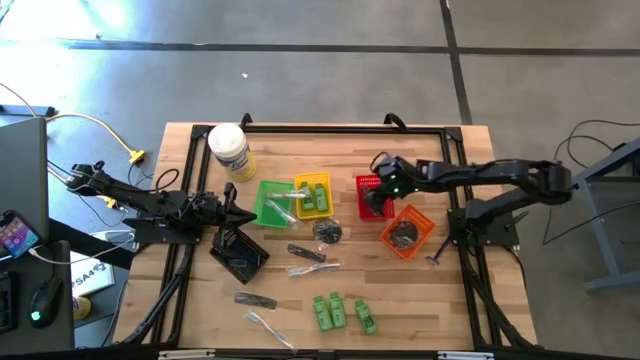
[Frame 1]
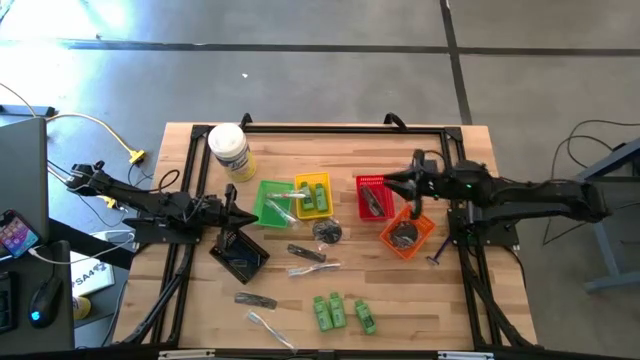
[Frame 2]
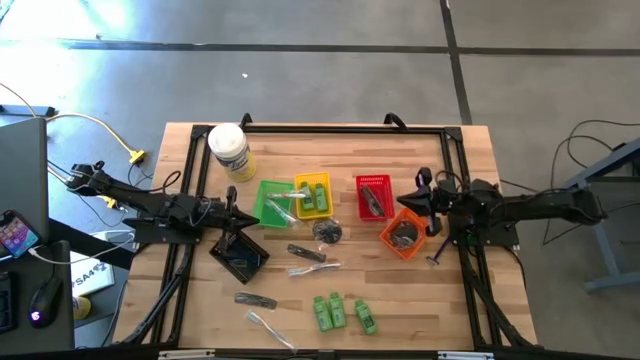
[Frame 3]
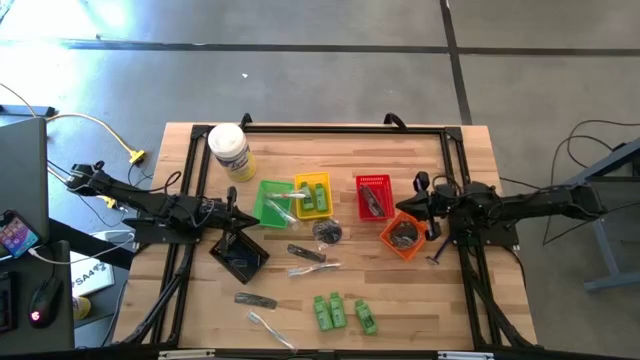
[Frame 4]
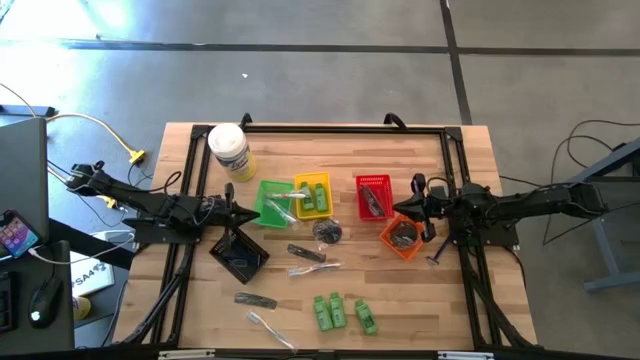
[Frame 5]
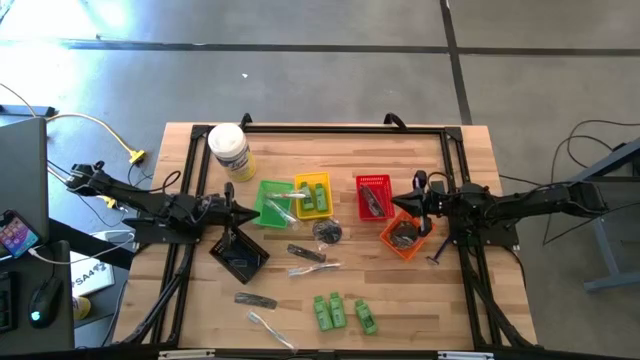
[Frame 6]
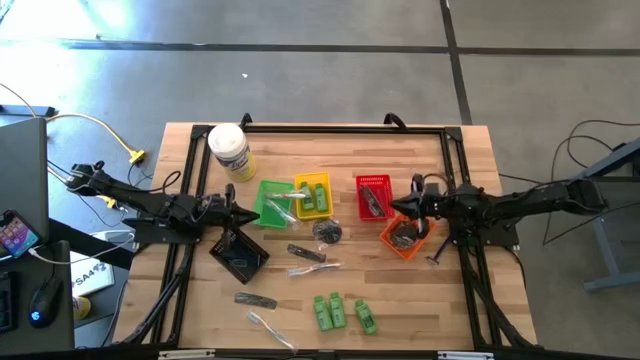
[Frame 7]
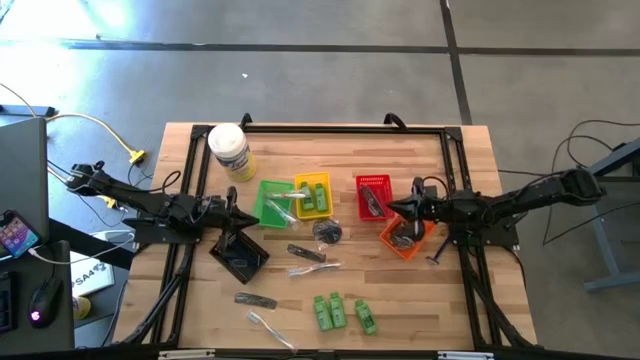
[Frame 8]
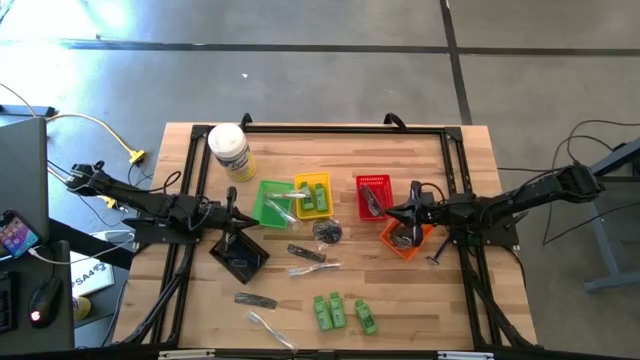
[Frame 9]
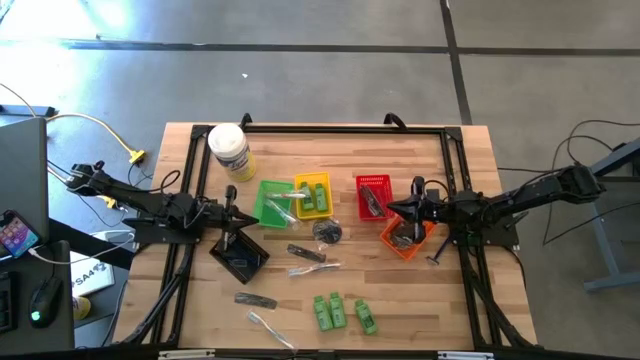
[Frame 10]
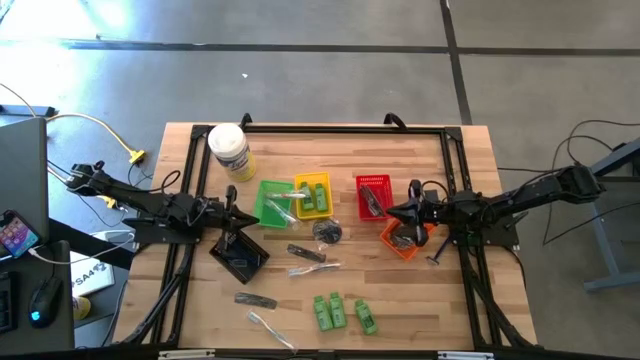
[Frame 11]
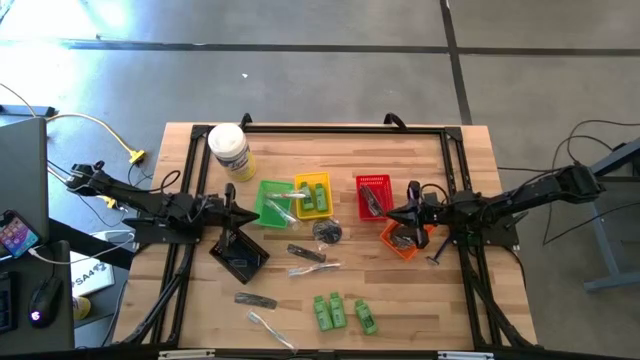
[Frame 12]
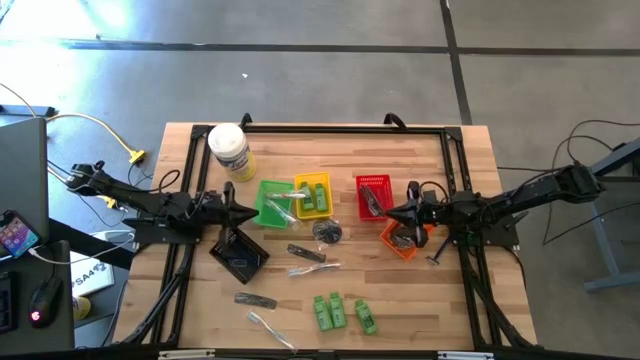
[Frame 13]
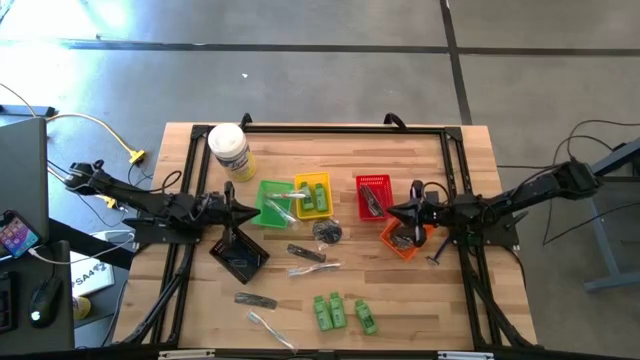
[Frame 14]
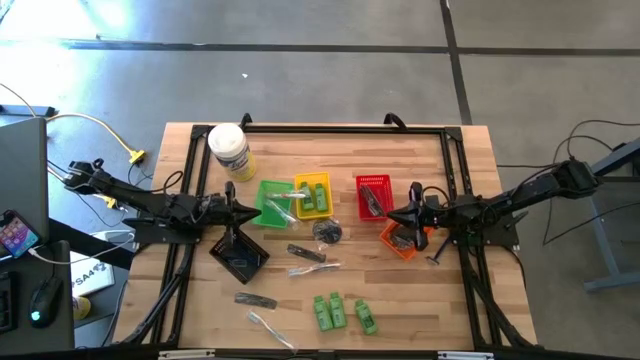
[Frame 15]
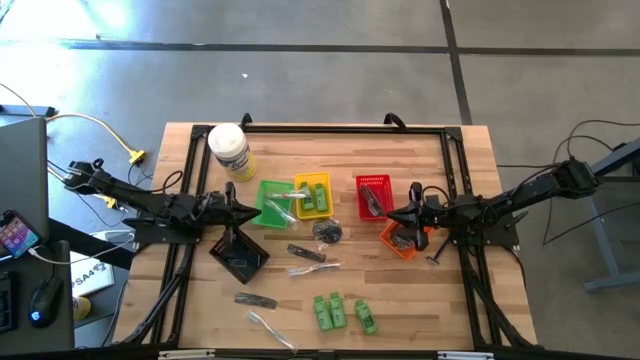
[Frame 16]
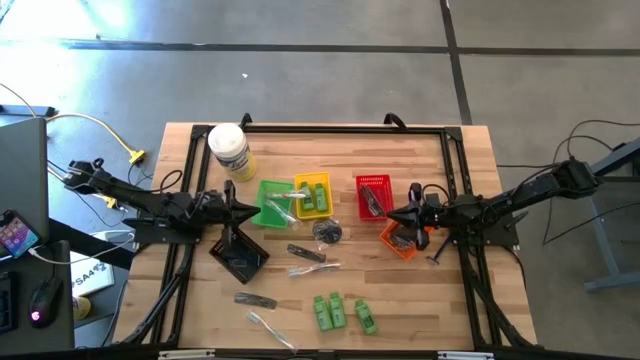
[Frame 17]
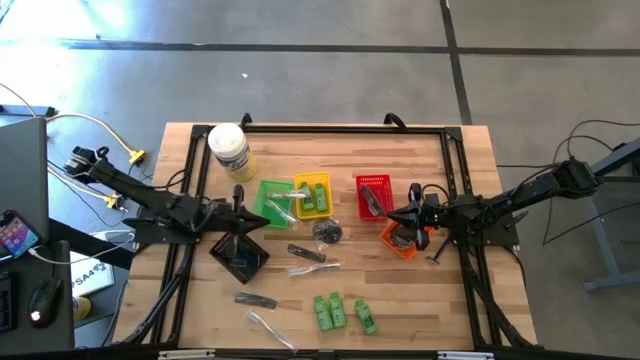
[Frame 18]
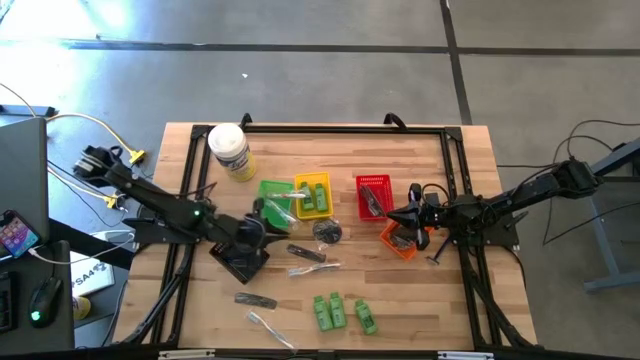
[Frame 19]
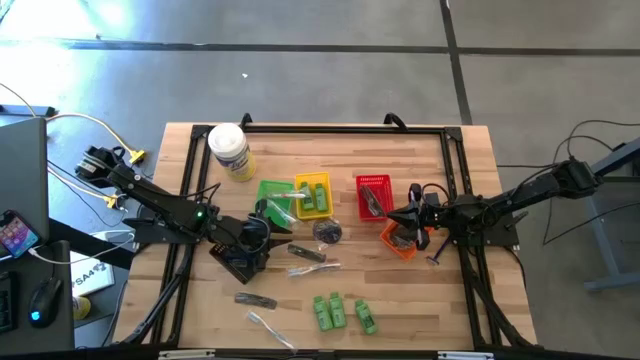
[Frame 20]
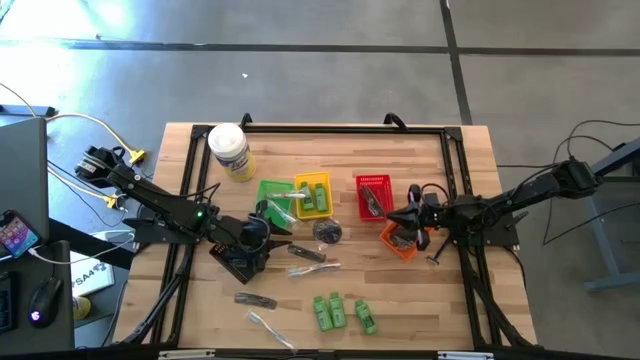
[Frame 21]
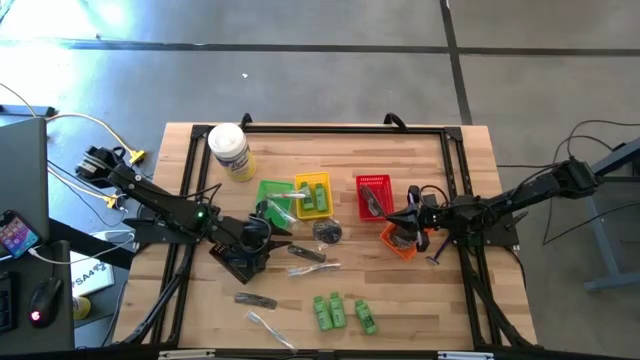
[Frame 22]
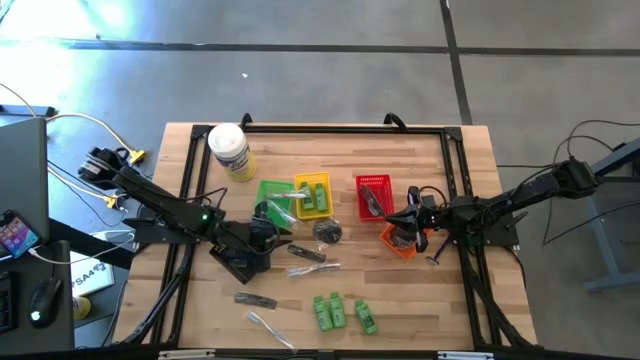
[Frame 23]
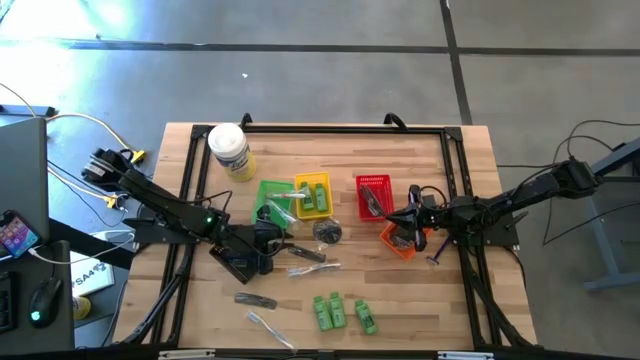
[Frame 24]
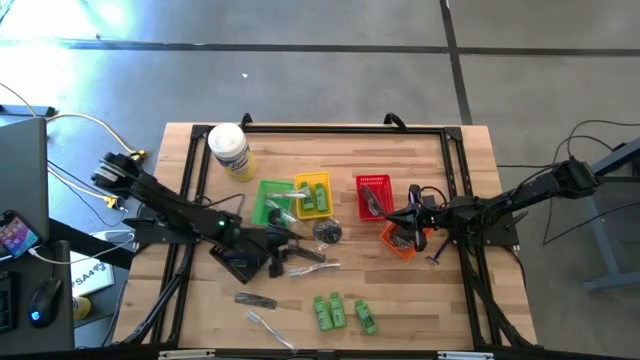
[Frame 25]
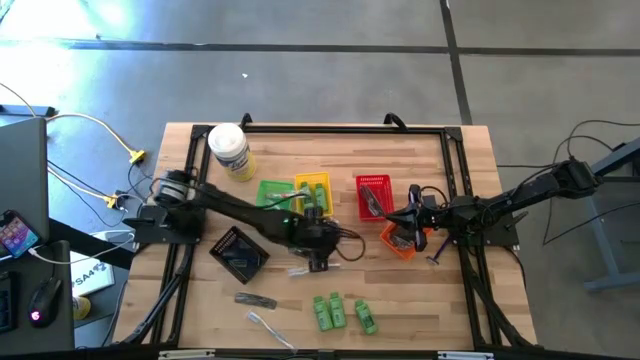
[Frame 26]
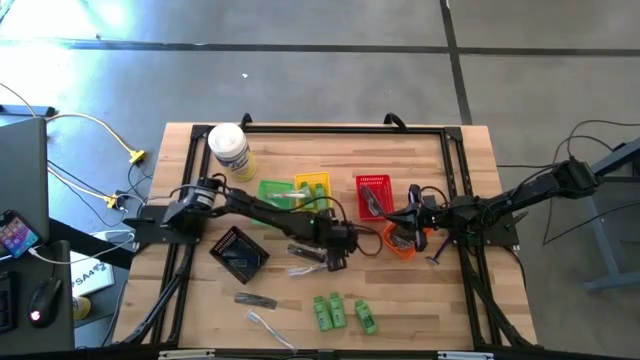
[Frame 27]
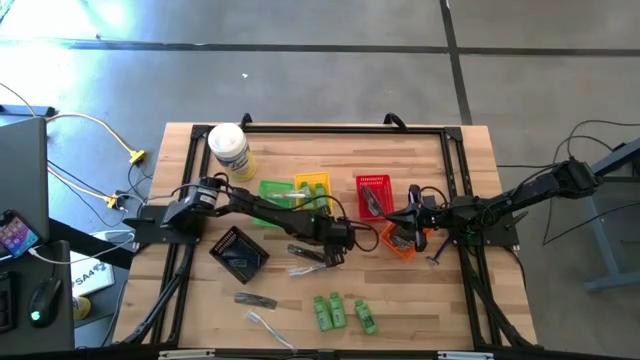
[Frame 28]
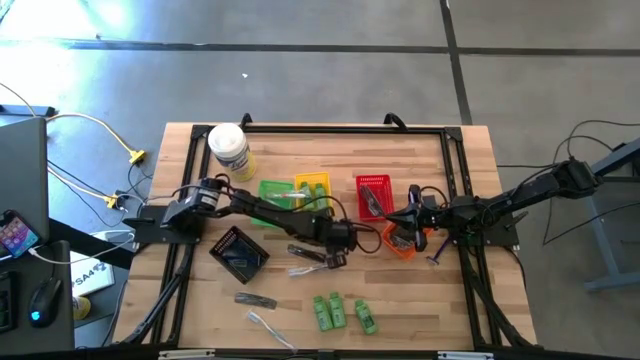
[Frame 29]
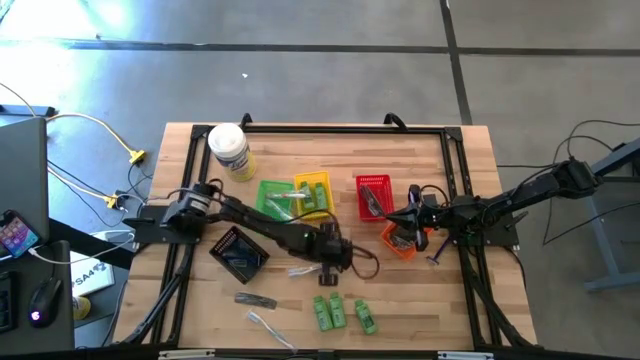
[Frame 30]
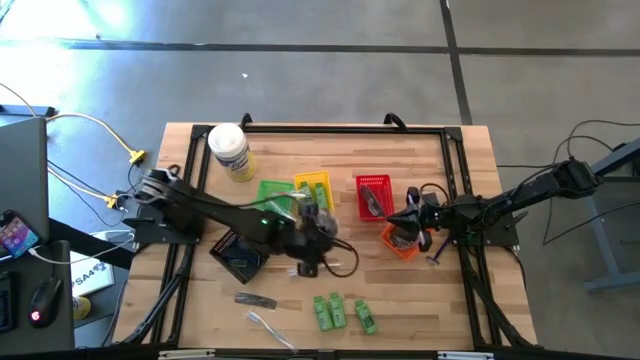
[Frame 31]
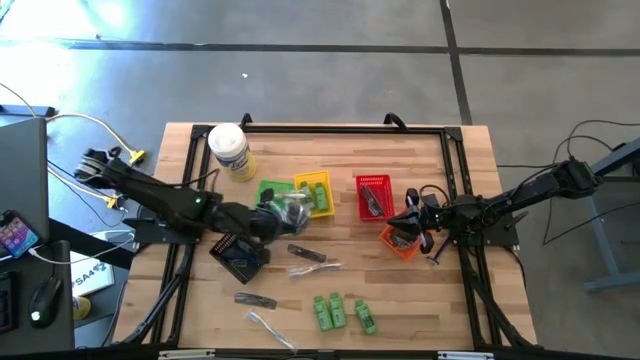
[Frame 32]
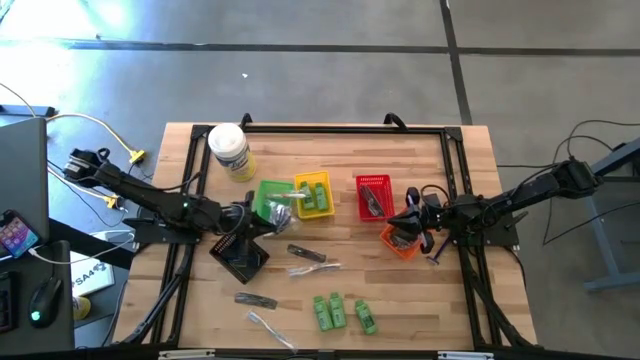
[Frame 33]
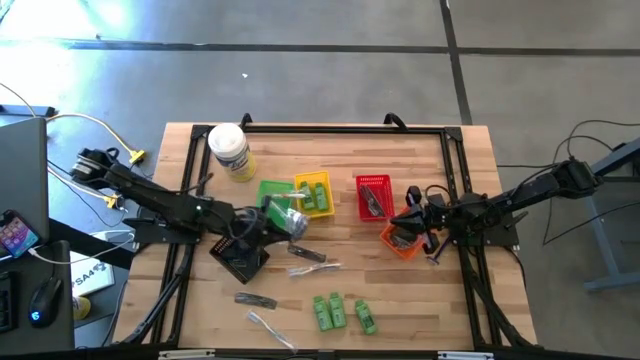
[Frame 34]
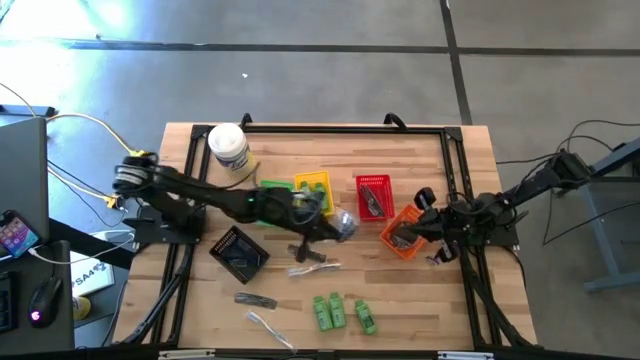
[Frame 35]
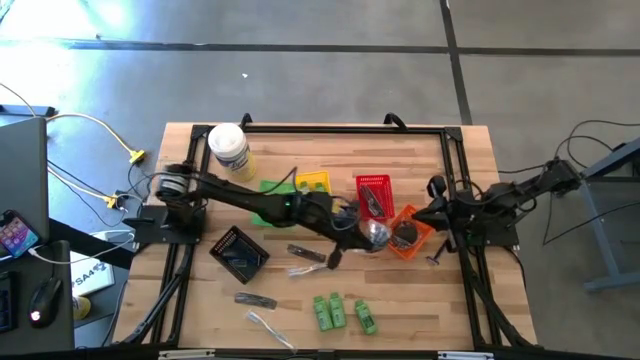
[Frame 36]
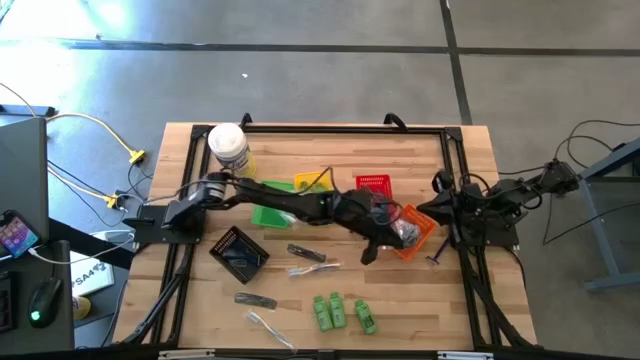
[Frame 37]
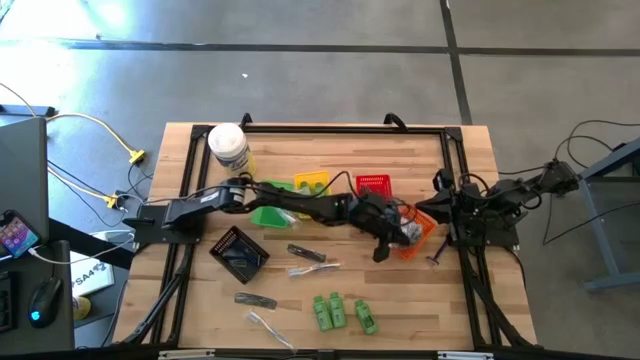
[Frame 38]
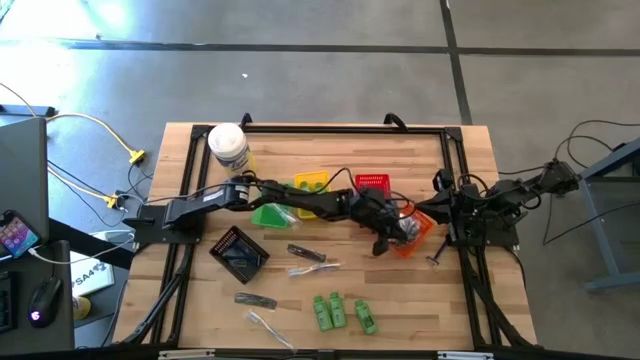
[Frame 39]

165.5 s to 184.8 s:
Task: Pick & Place Travel size toiletries
Put the black hairbrush into the orange basket

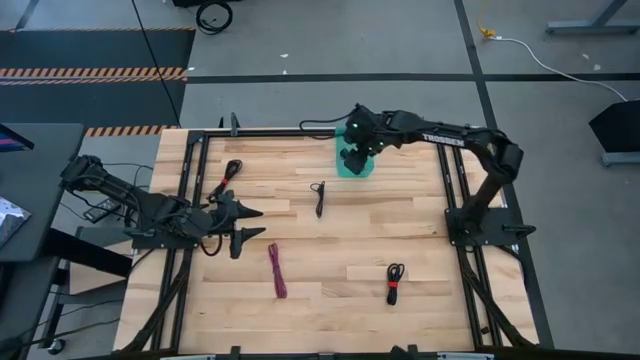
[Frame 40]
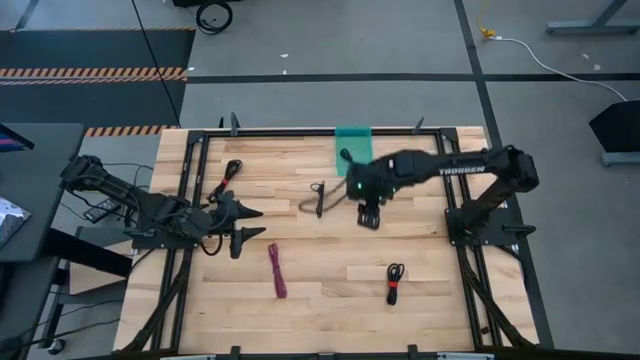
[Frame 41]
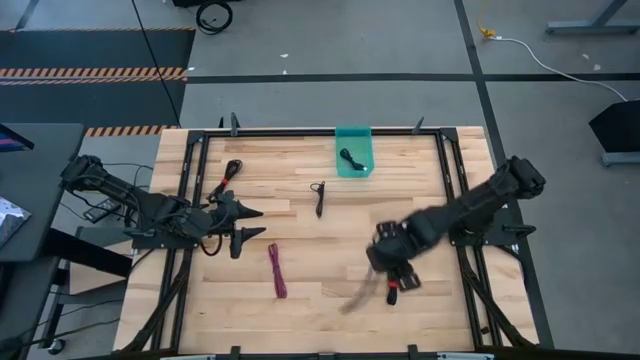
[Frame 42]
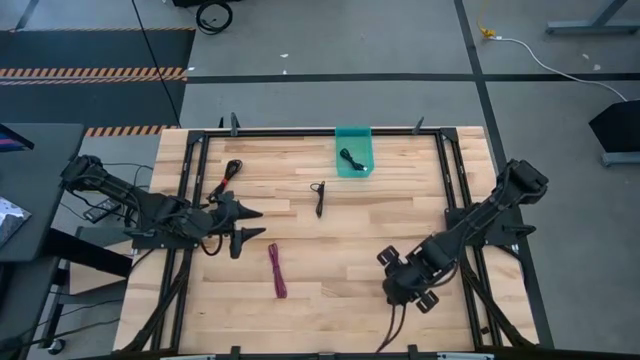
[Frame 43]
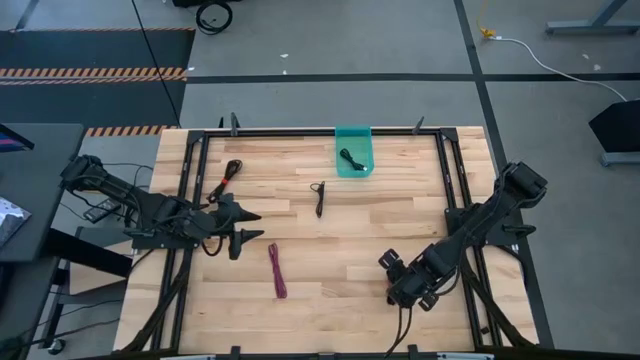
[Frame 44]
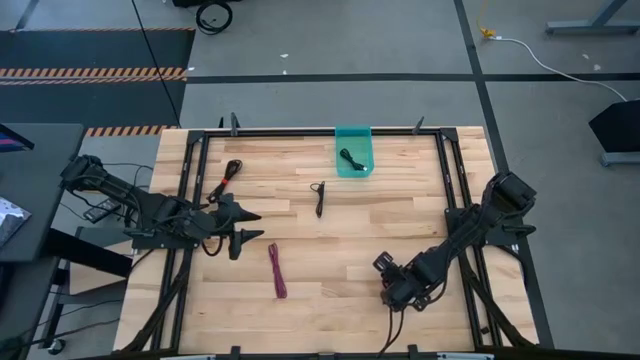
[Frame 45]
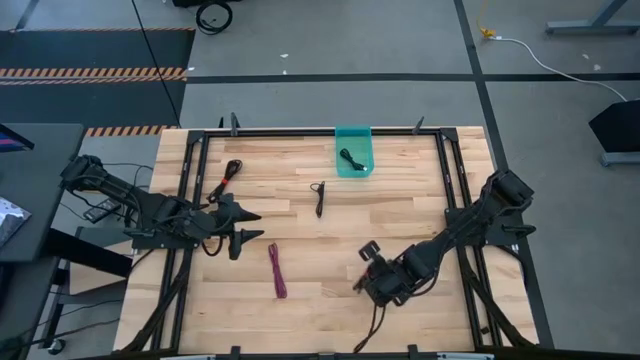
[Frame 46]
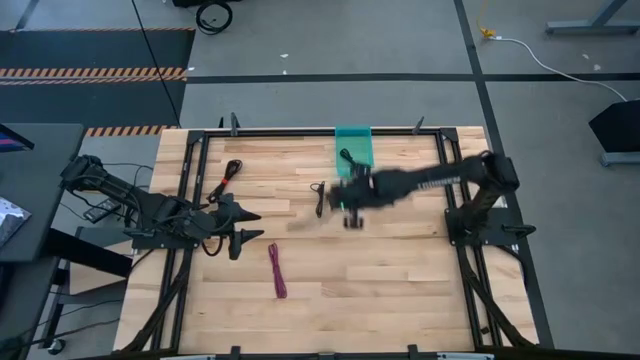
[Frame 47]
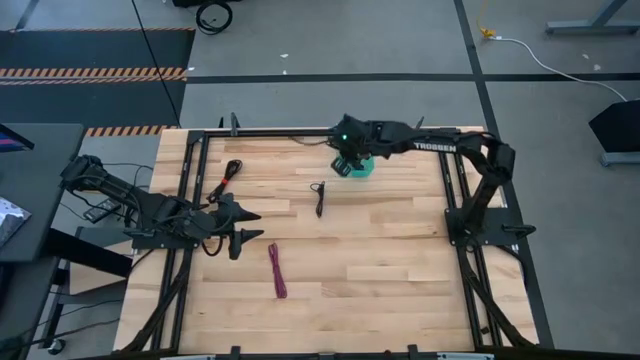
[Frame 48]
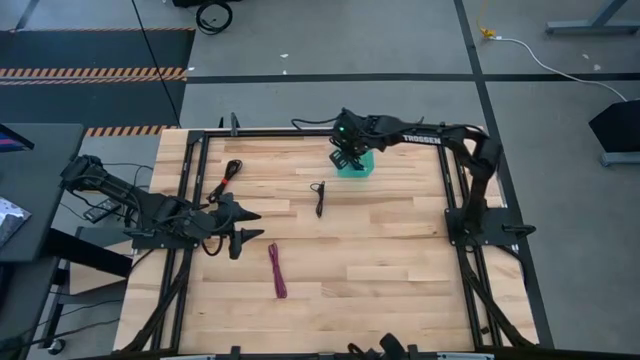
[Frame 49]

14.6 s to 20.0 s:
Task: Pick and place USB-C Cables
Put the black charger cable into the green bin
